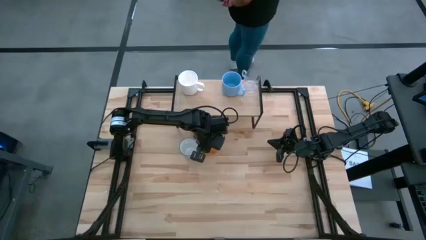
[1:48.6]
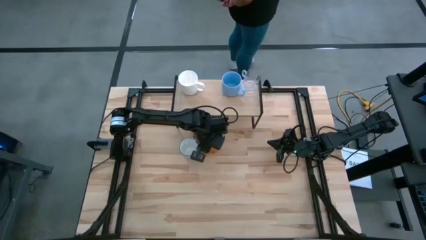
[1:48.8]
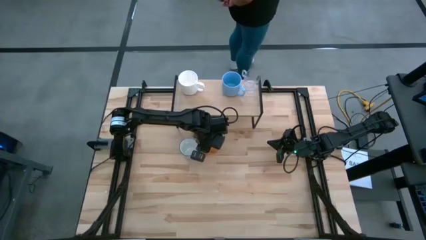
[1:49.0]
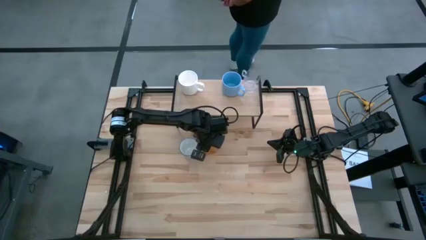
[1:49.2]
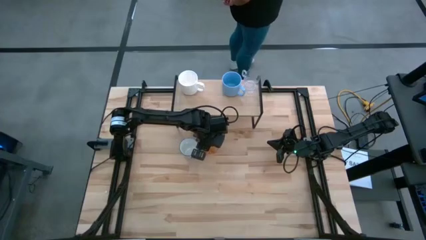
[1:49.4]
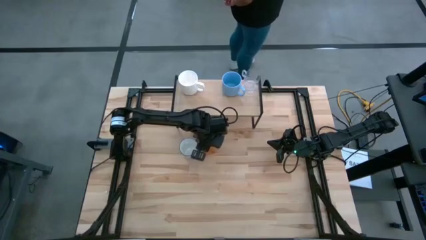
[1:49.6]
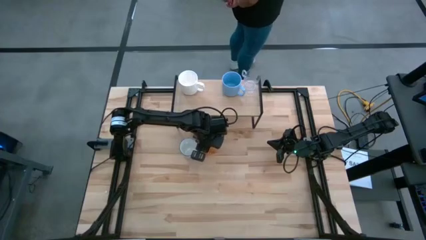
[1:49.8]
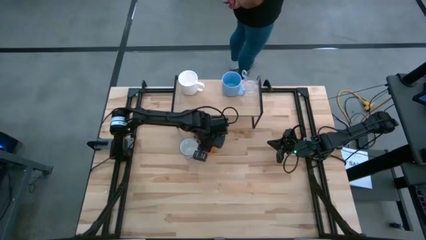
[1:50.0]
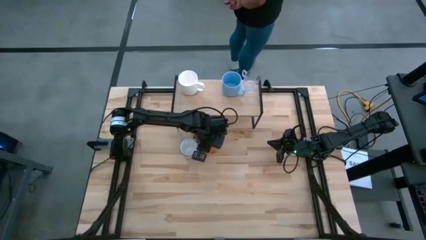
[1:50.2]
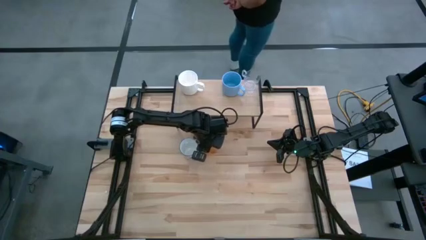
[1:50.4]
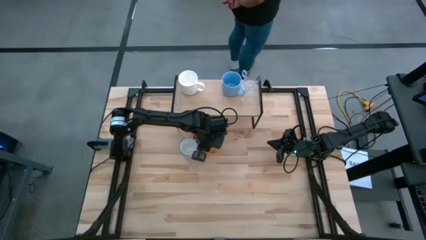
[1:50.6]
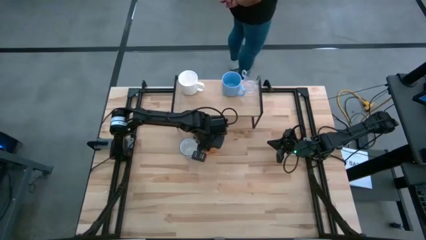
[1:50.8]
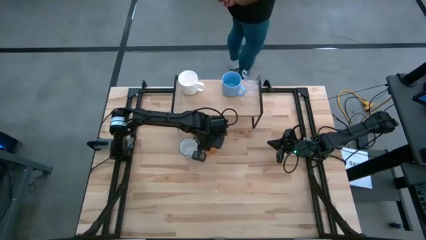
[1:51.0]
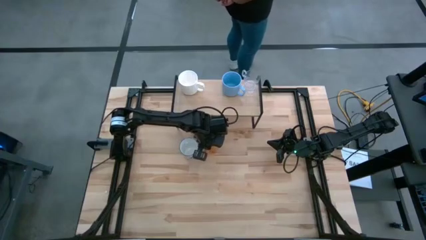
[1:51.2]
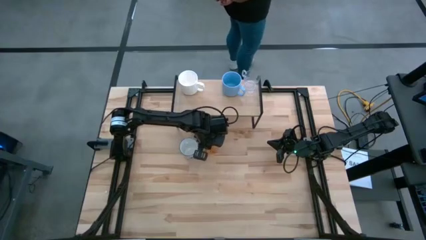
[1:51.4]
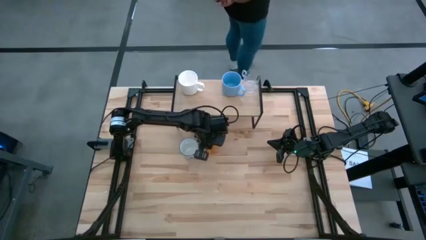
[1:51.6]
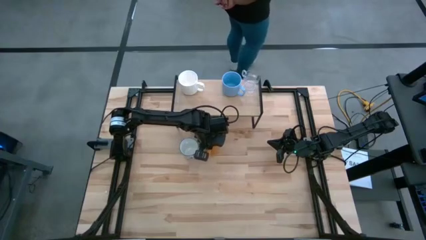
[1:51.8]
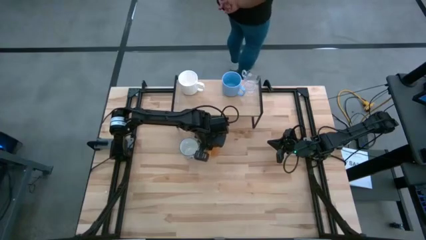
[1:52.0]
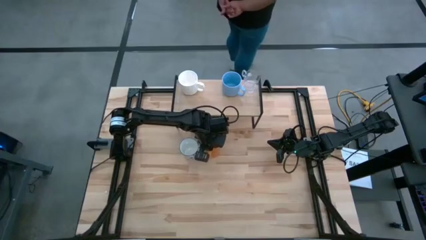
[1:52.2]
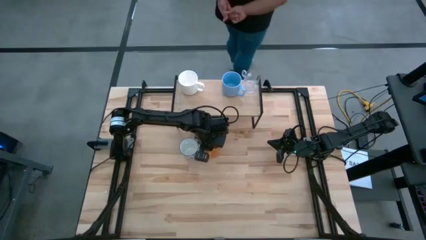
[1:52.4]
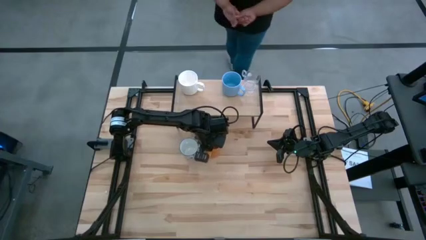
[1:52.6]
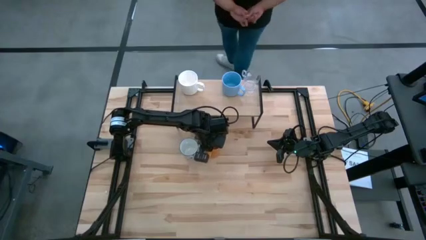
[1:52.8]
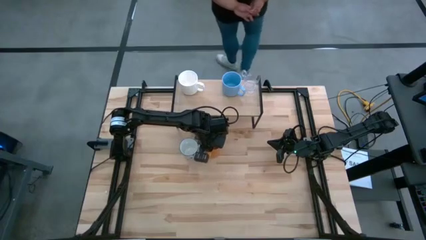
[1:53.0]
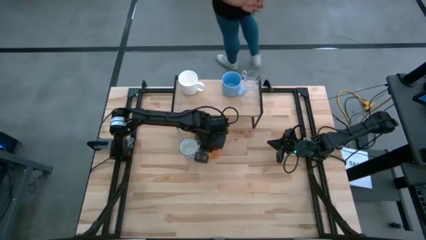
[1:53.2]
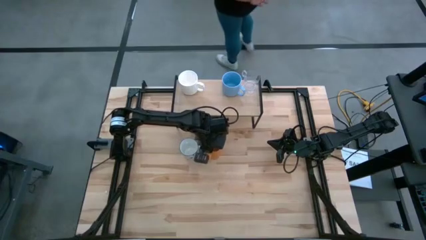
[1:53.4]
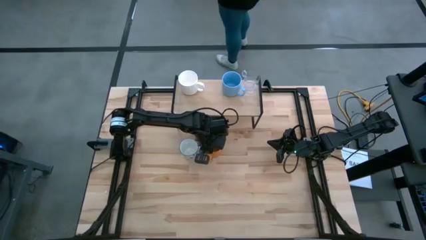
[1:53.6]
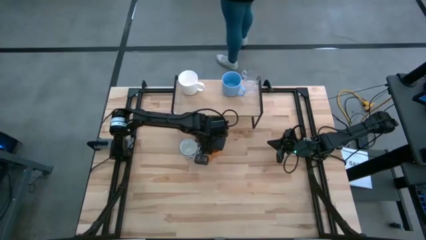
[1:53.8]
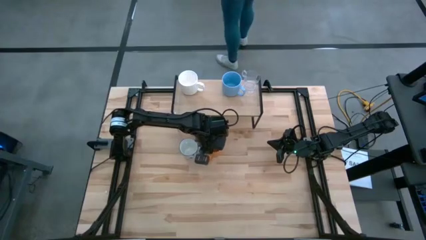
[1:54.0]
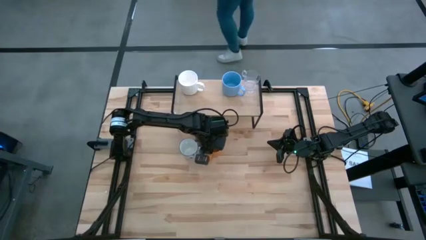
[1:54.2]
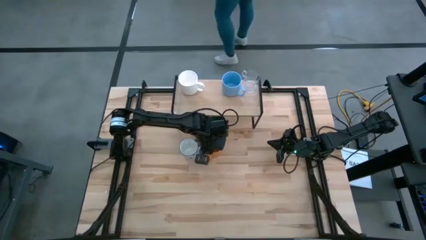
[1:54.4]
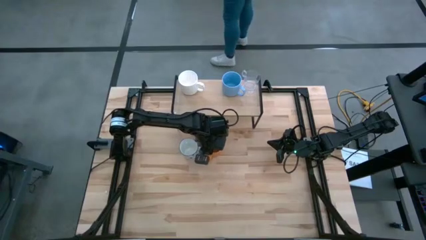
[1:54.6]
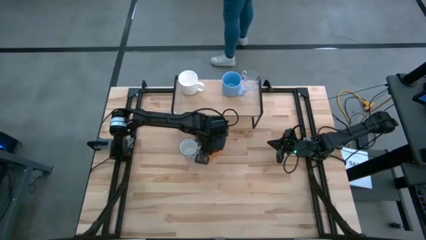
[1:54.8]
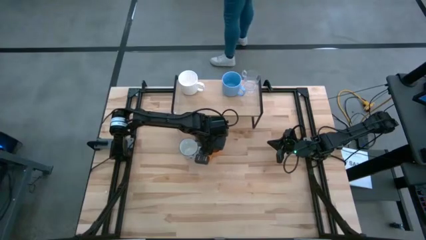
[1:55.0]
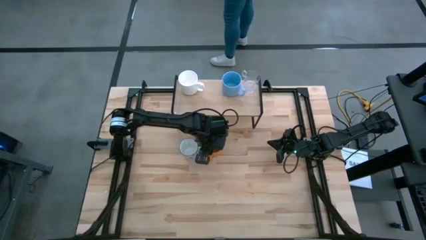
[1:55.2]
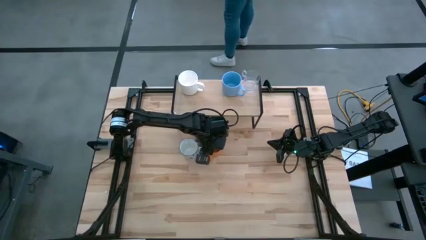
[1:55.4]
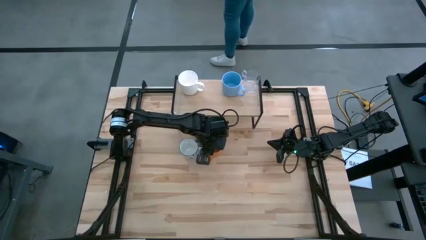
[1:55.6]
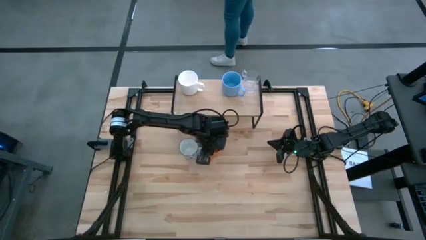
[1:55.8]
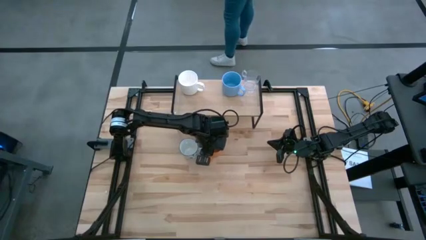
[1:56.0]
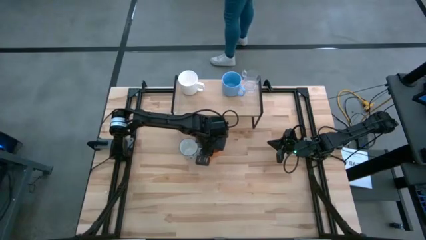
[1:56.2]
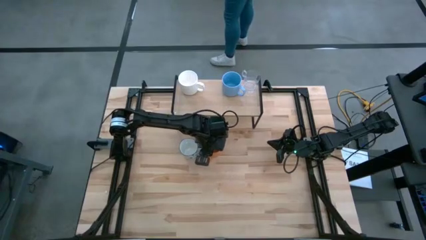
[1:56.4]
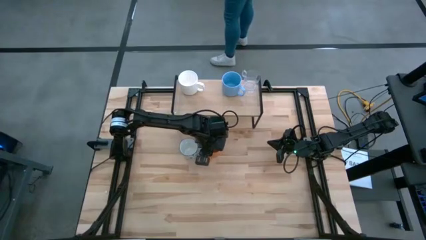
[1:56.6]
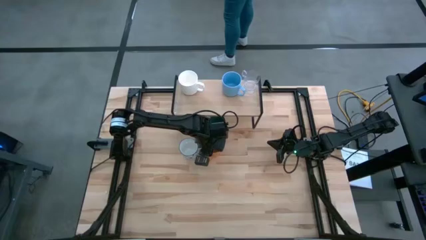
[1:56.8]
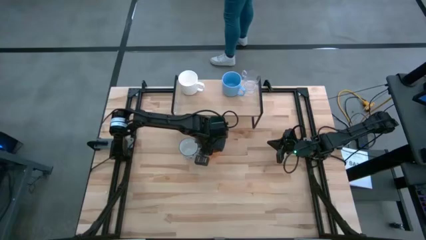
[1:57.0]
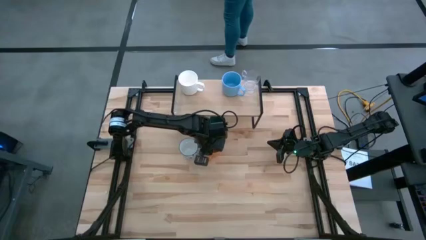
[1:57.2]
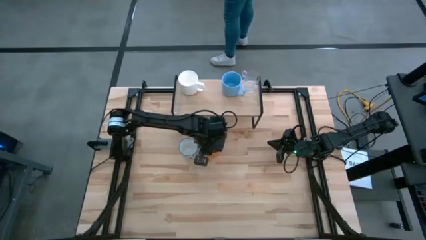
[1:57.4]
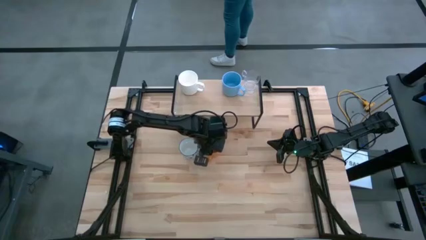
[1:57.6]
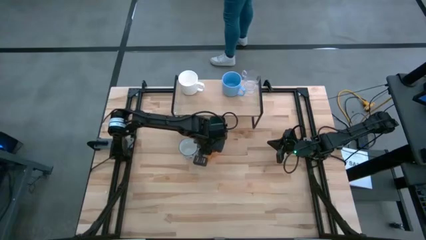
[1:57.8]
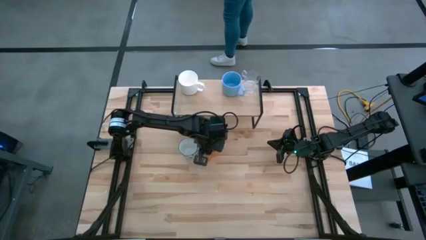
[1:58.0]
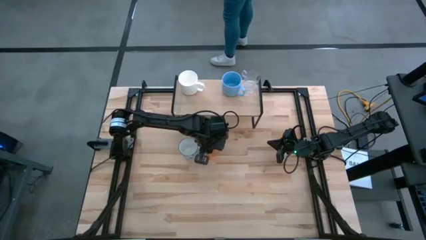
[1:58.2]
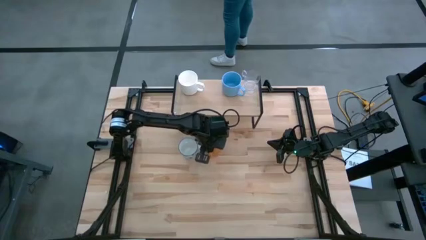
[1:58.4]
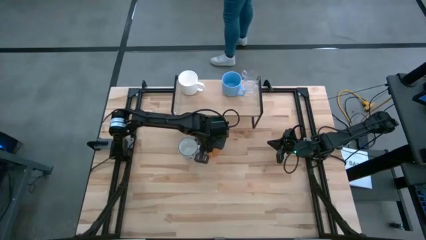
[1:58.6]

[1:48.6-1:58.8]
Task: Stack small to large cups/mugs on shelf
Put the orange mug on the shelf

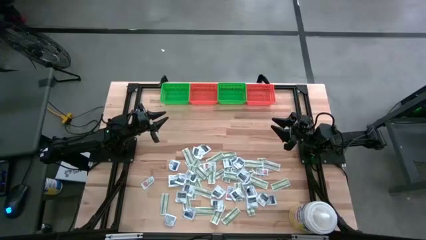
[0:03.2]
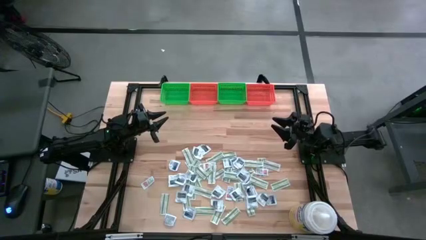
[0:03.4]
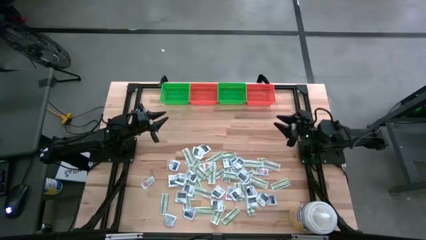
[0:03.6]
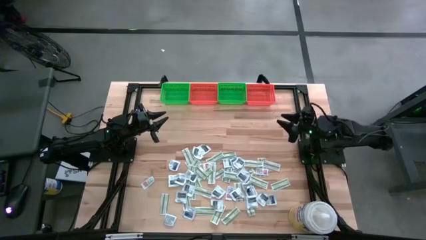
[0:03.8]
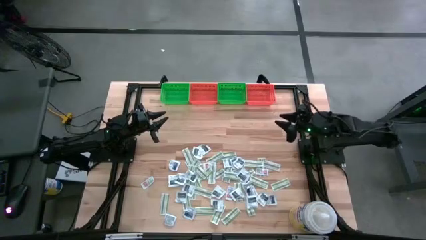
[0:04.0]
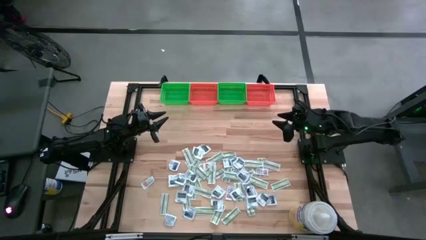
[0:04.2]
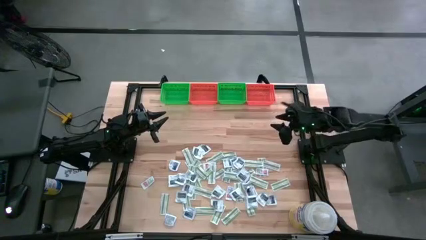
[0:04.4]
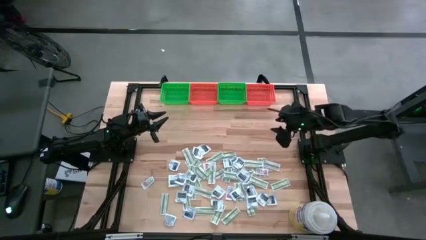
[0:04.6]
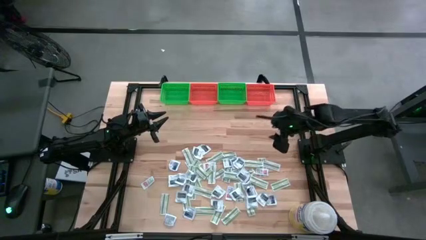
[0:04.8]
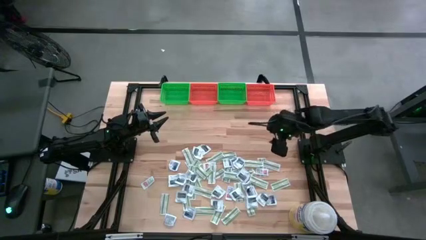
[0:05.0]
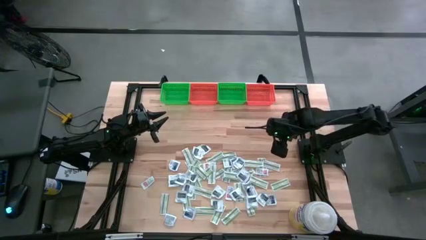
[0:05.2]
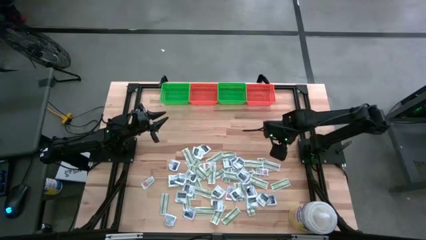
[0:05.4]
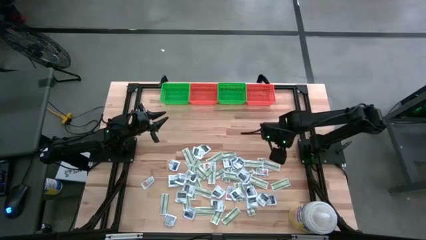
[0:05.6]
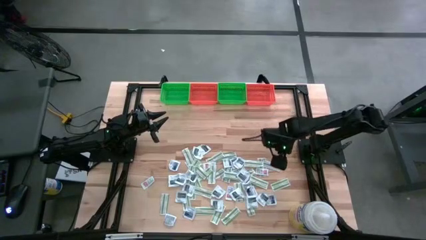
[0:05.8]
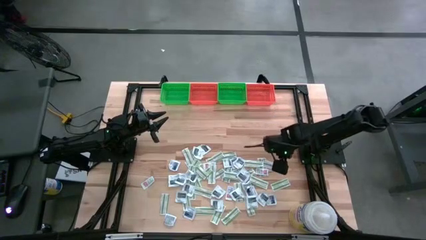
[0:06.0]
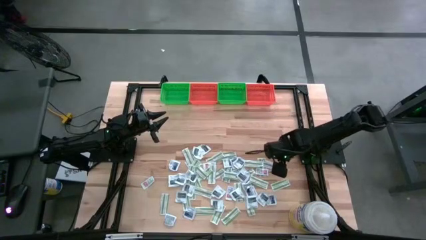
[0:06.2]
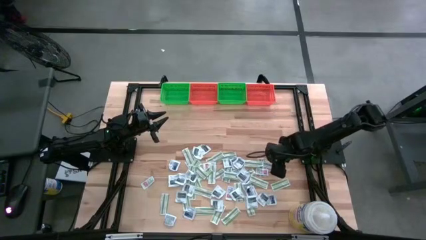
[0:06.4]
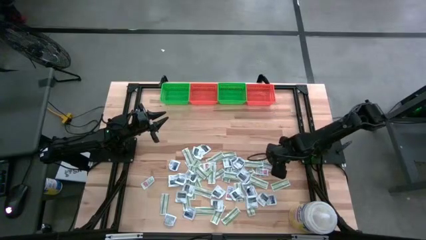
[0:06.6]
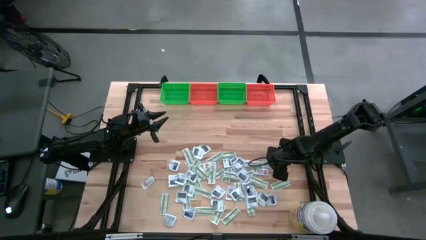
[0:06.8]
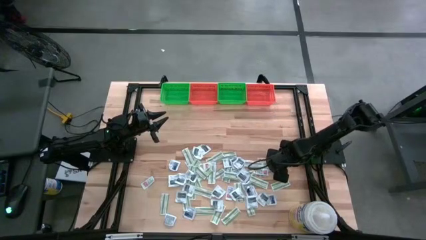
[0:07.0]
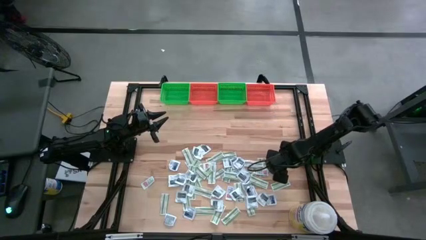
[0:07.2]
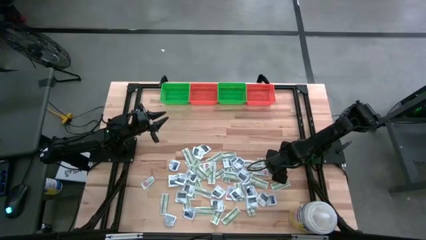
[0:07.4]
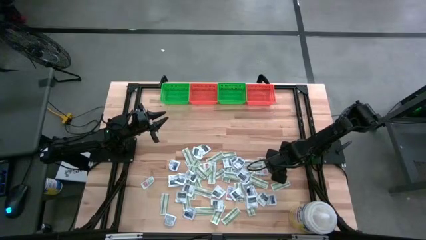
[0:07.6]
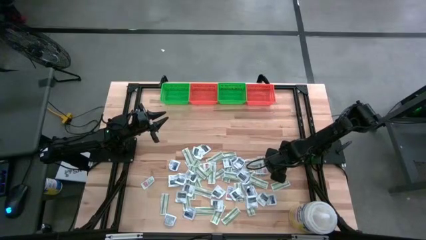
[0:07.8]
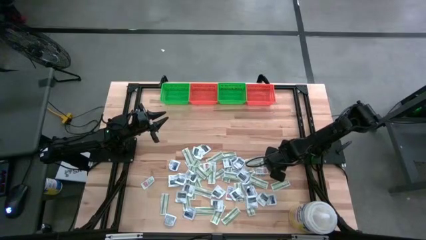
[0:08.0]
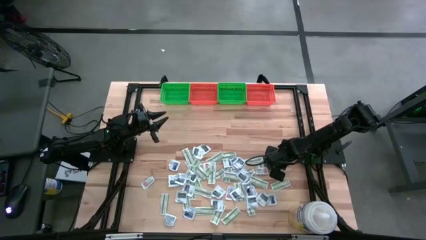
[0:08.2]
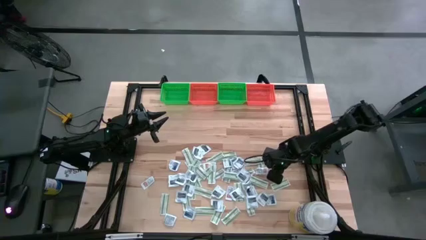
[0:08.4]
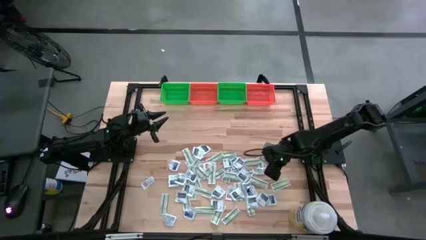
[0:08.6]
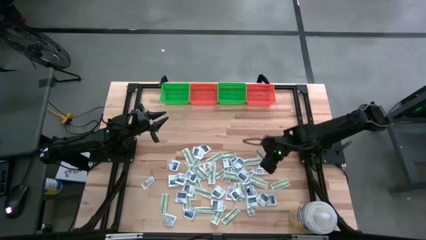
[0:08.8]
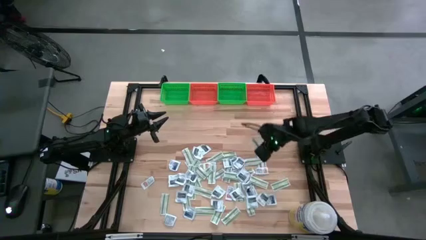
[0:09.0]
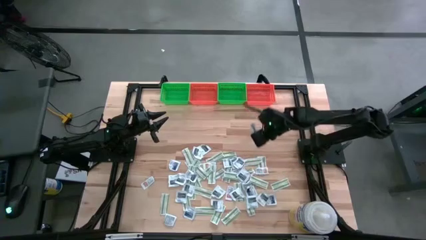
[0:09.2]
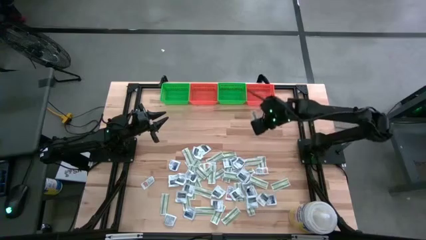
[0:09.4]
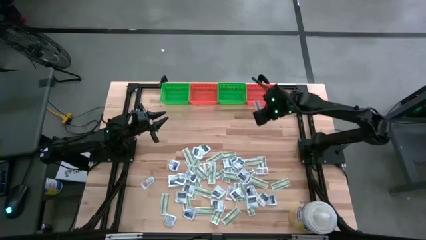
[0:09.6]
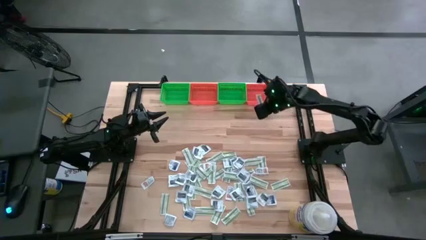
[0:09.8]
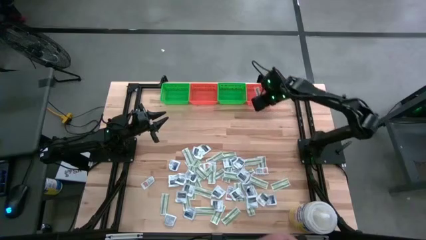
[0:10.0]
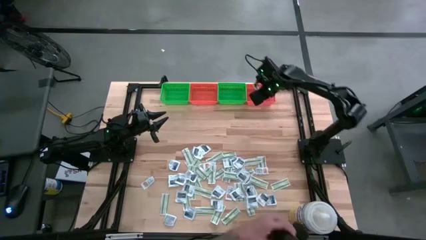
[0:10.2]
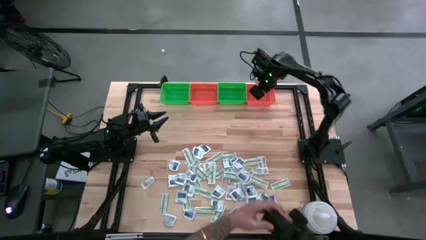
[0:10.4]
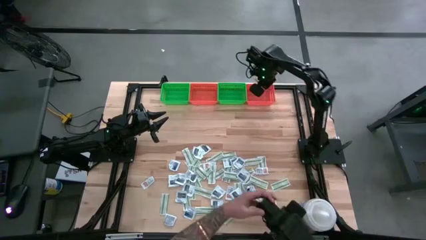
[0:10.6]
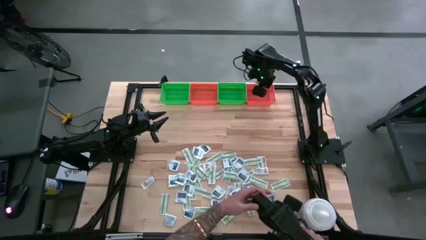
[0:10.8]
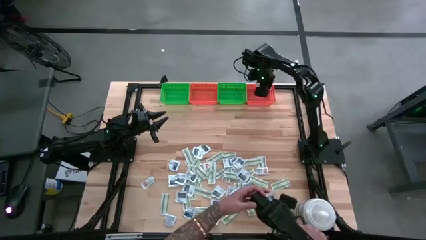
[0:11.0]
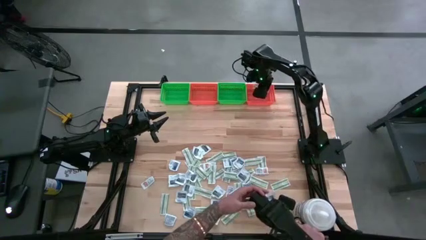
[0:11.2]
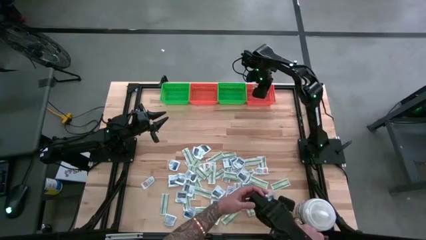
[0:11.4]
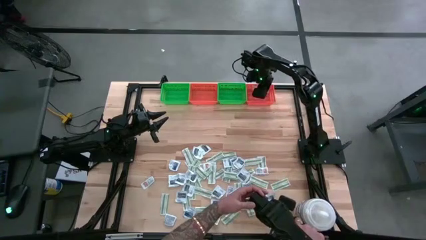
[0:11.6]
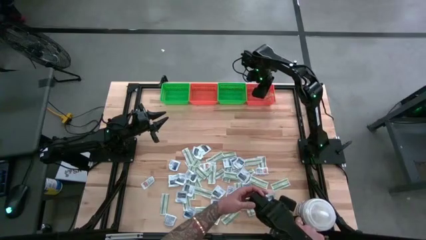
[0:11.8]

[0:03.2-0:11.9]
Task: Pick & Place First Aid Supplies
Put the green bandage pack in the right orange bin
